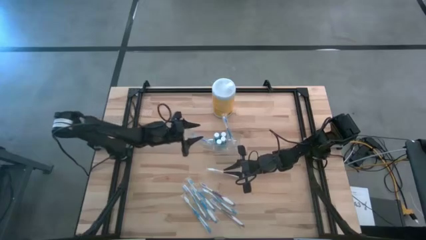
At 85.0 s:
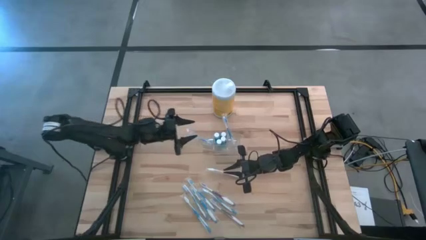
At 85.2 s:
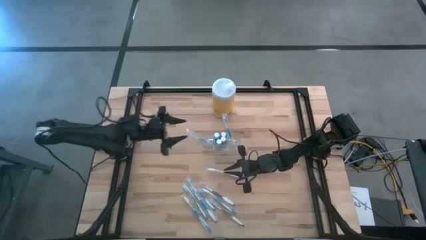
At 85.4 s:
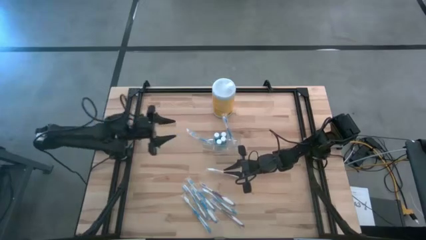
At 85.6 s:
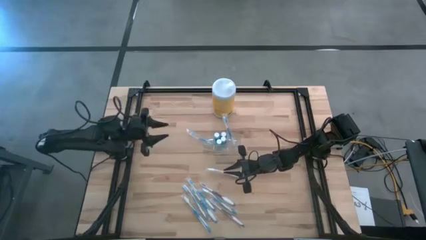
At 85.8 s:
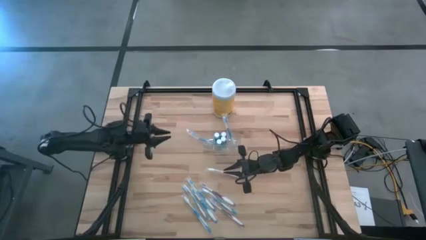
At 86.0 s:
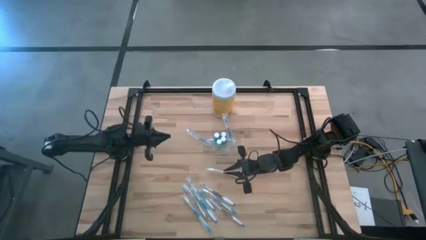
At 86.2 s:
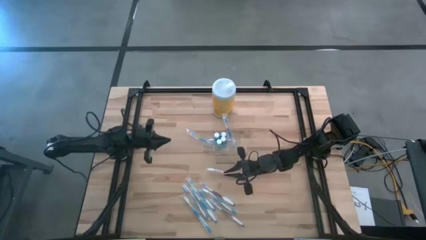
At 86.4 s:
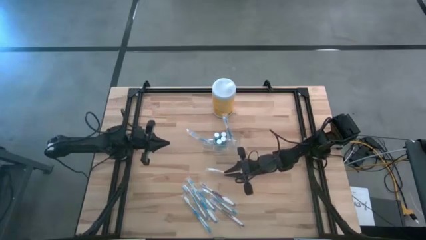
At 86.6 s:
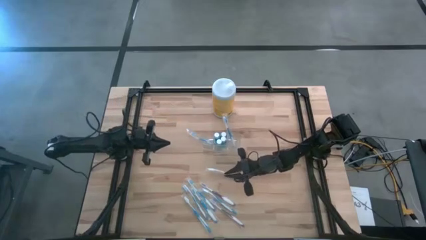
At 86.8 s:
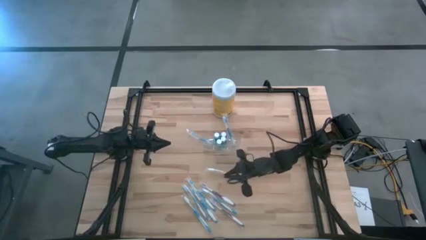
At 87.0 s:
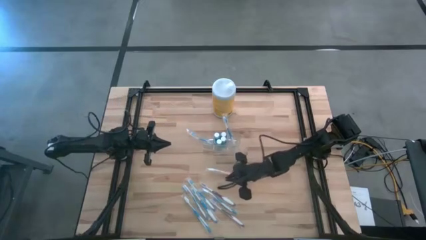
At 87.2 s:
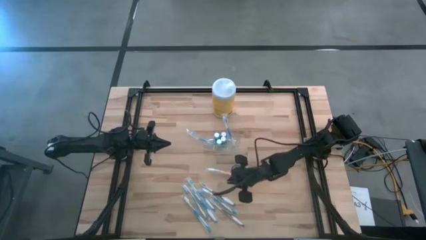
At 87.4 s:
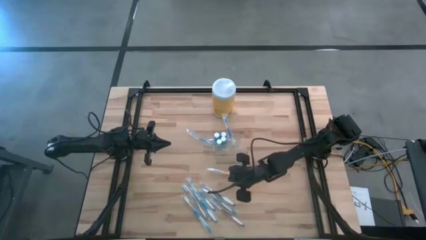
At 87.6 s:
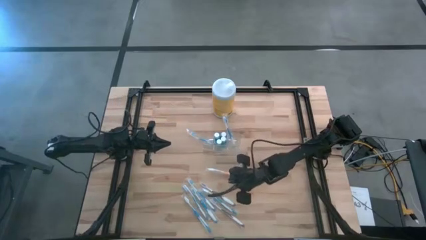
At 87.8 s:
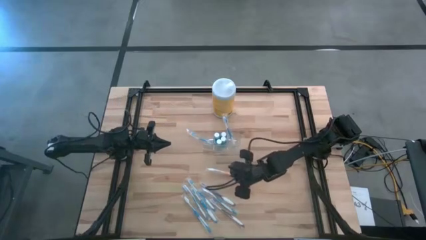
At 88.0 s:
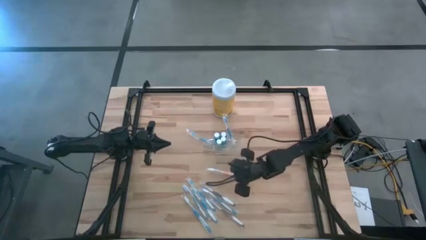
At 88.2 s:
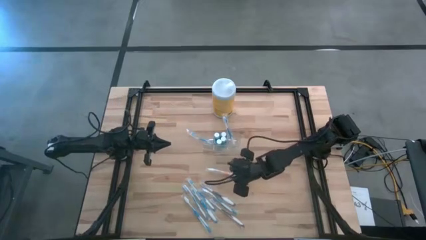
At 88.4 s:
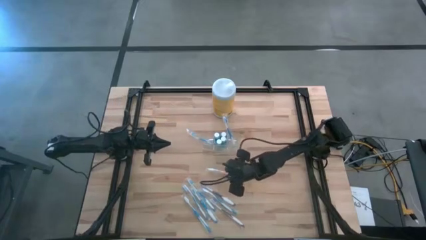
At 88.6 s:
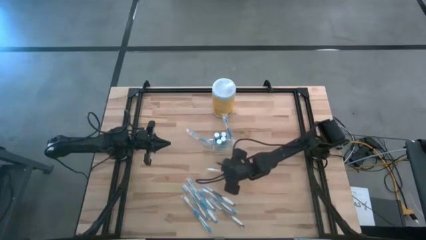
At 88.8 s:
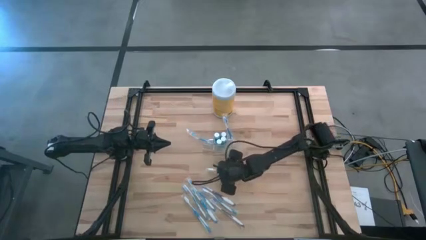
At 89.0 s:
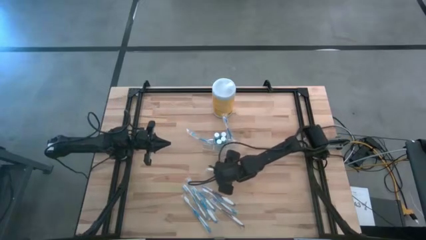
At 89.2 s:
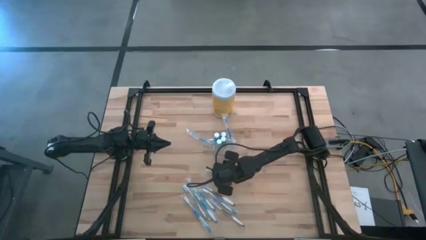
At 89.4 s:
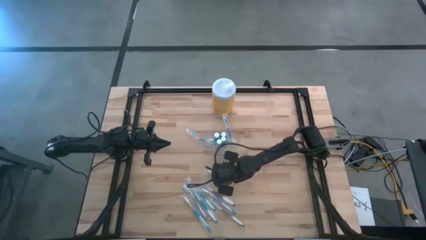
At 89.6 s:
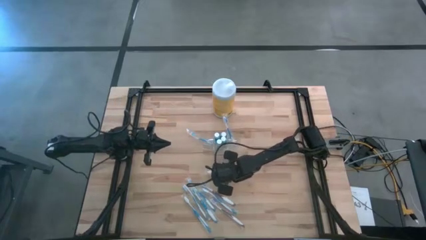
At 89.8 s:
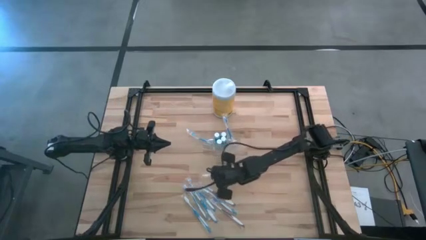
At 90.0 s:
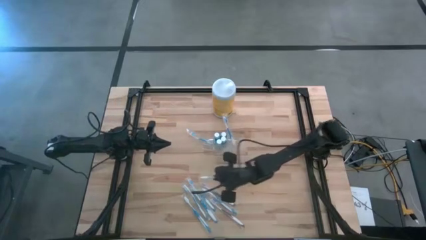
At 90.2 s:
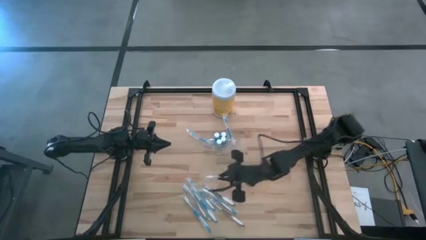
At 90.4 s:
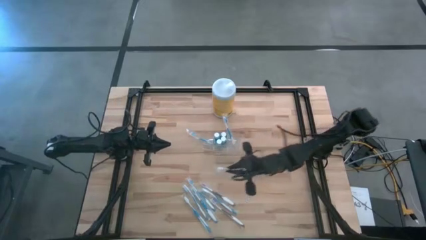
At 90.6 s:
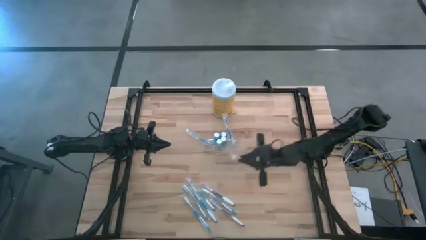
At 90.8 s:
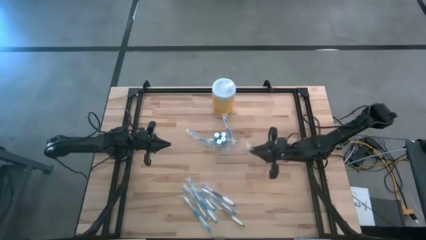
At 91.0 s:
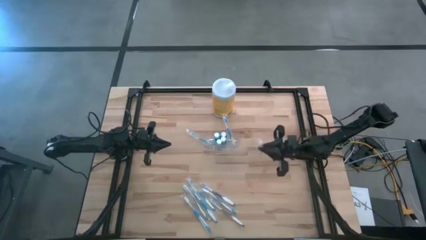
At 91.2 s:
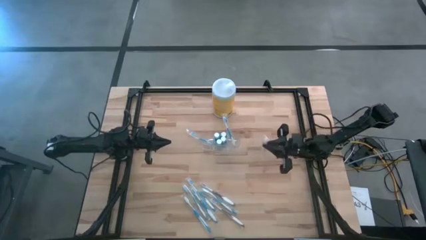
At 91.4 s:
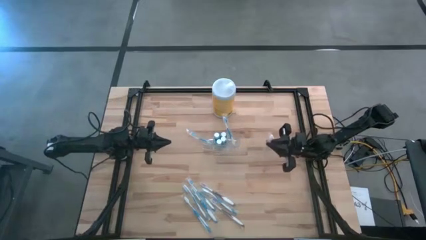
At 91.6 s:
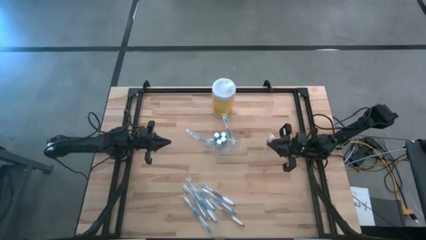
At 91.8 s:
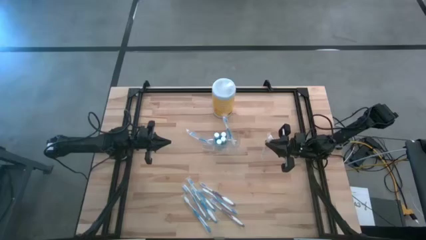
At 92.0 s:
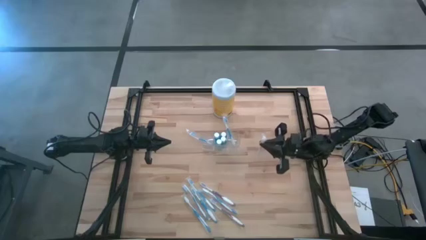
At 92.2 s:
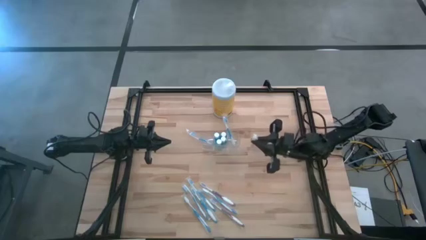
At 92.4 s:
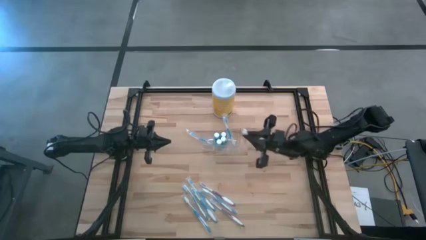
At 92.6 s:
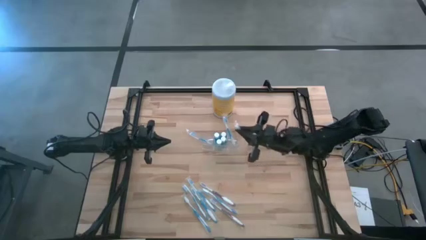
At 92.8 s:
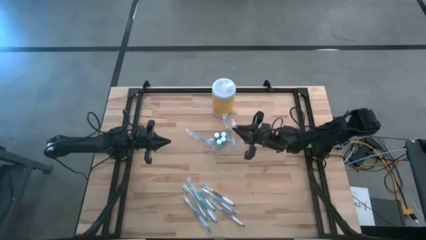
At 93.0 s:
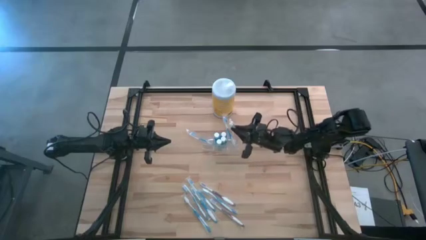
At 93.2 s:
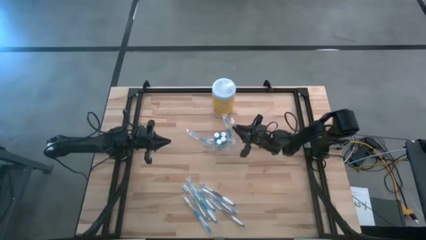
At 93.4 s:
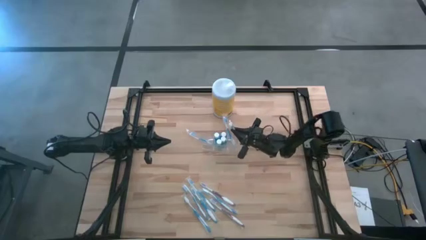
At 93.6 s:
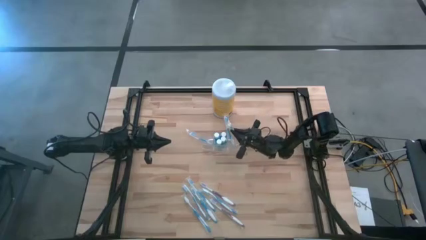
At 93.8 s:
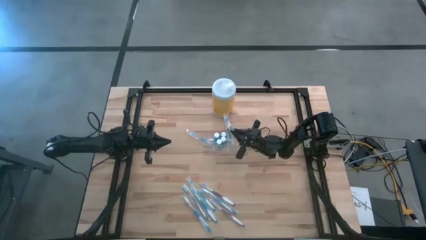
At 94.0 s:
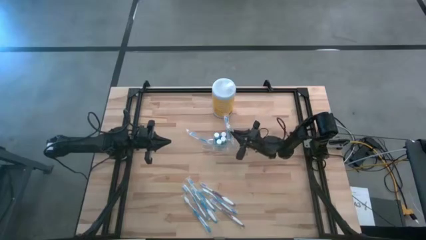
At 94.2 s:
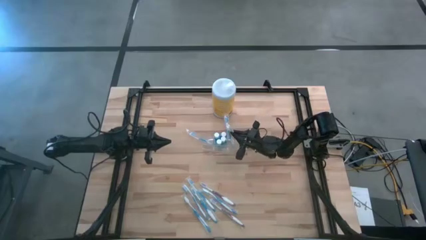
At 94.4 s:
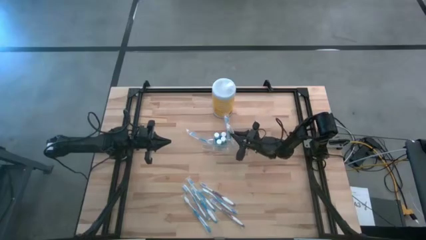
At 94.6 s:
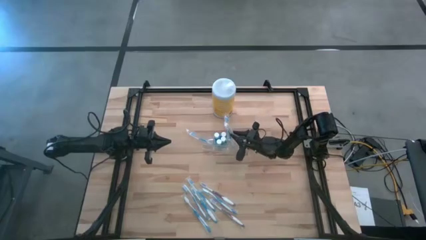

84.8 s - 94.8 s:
Task: Pick & Place toothbrushing station
Put the orange toothbrush into the transparent organizer

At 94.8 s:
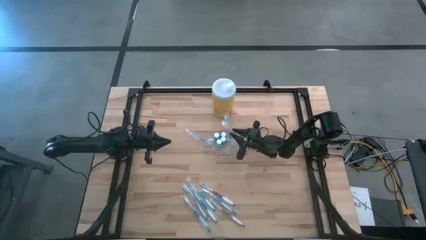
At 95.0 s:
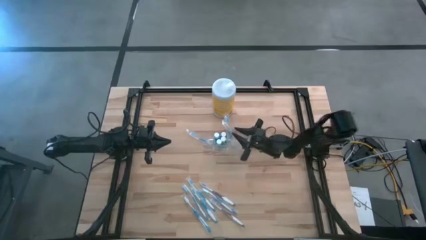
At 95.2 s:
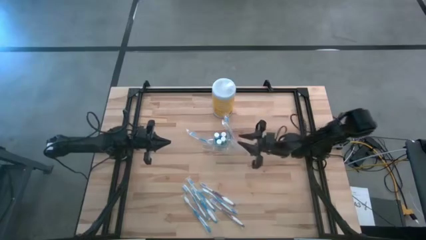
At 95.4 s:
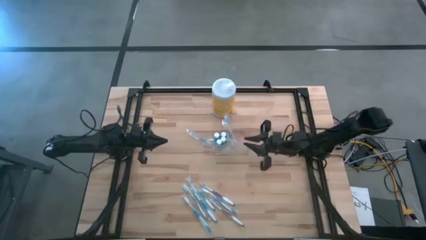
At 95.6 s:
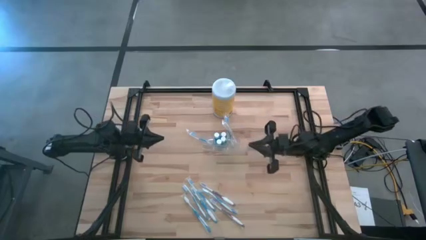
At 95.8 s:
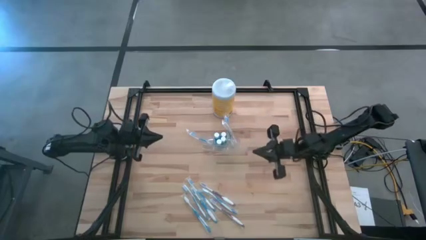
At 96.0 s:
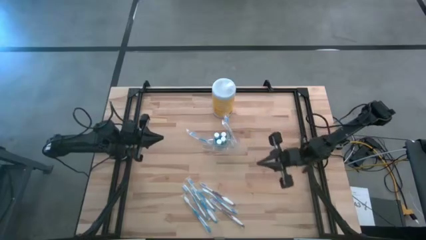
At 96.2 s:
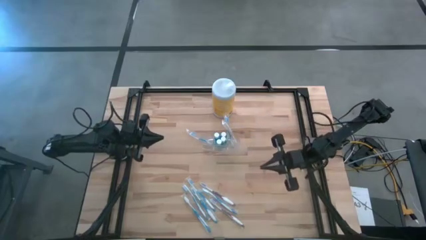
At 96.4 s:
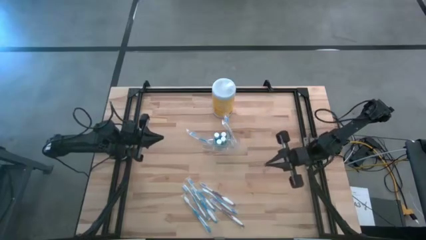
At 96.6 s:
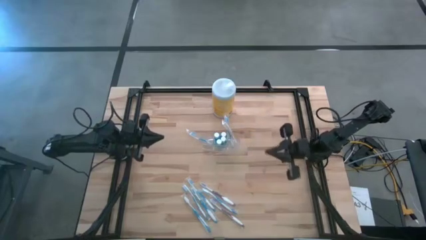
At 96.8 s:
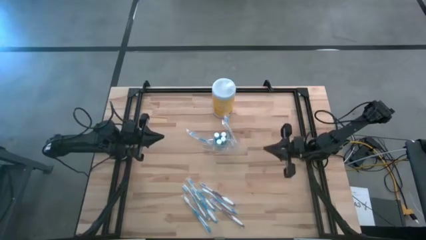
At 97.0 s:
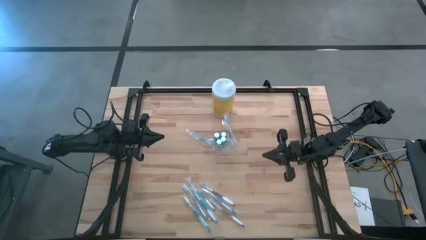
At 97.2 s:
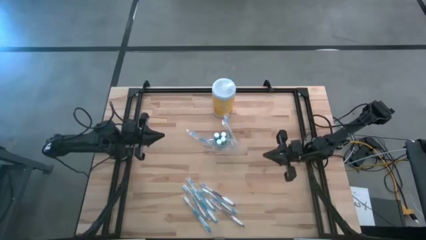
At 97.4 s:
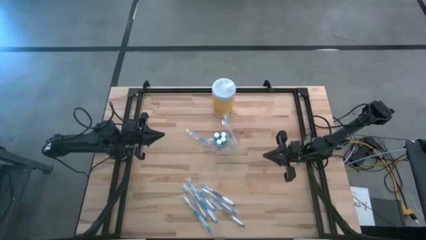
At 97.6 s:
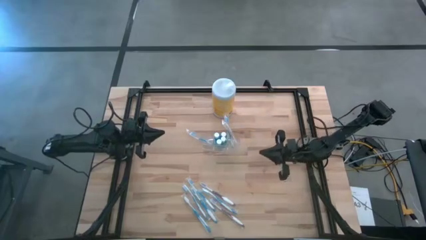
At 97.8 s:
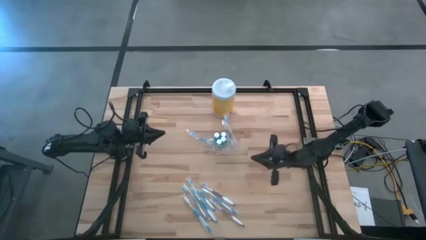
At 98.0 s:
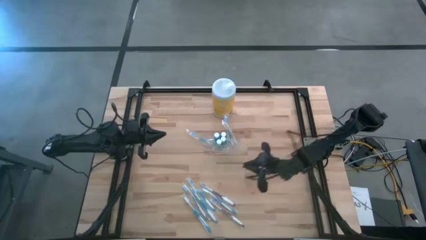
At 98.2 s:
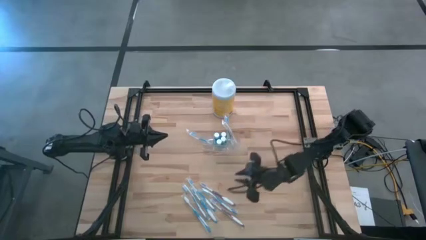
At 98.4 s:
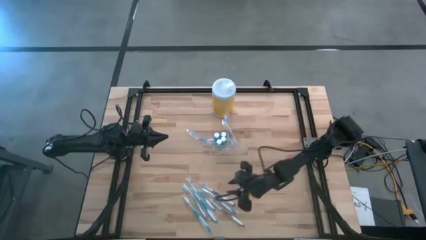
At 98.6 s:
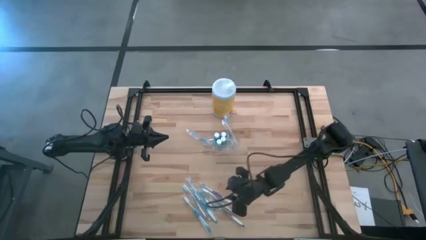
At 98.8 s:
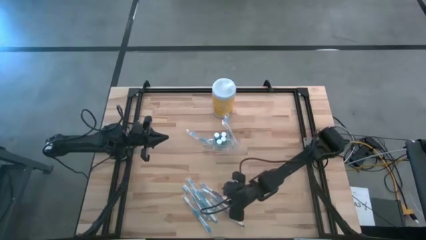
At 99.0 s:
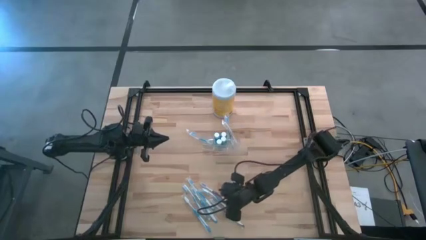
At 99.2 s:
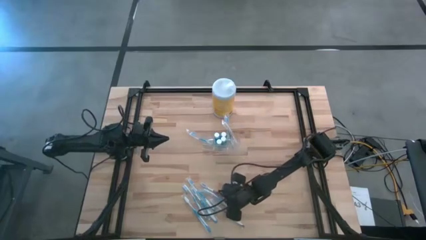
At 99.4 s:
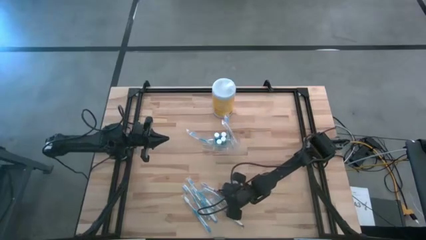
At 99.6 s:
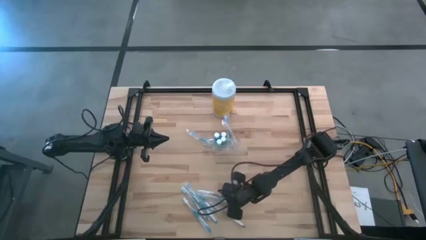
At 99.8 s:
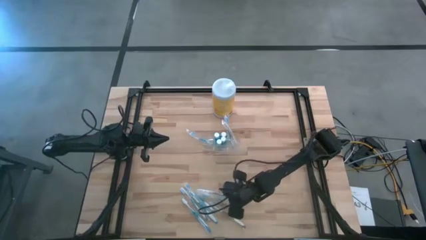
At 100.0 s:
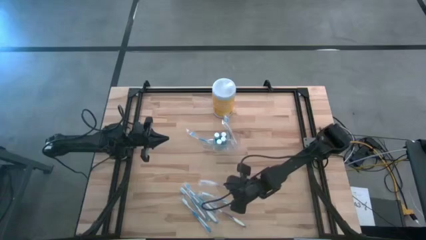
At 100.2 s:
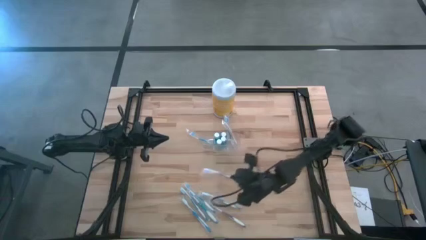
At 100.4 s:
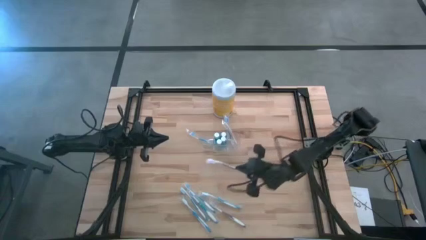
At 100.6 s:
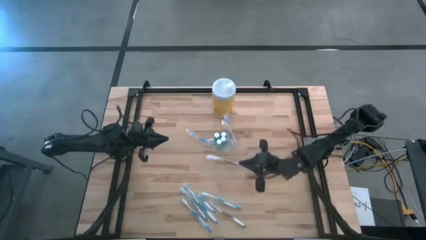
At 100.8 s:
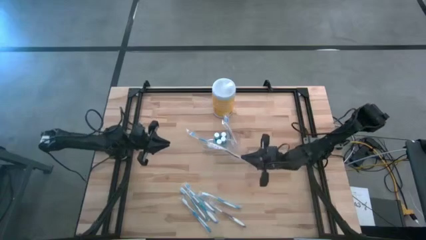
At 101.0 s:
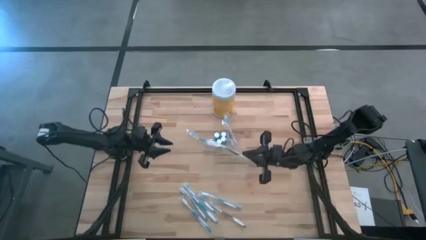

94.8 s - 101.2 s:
Put the purple toothbrush into the transparent organizer
